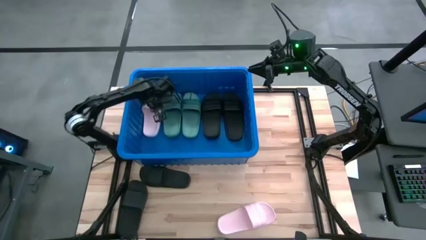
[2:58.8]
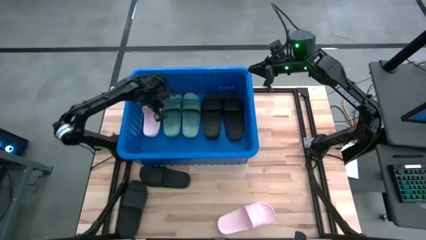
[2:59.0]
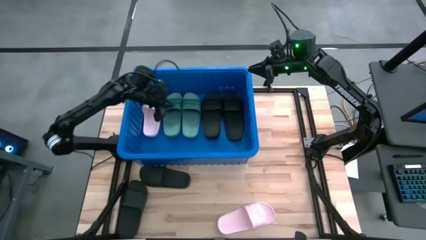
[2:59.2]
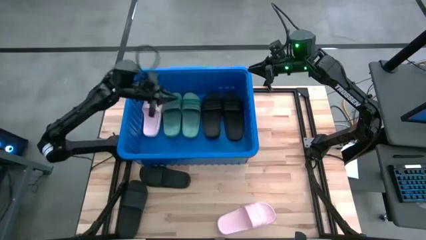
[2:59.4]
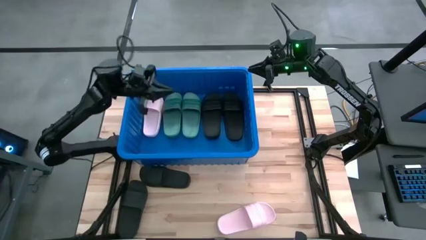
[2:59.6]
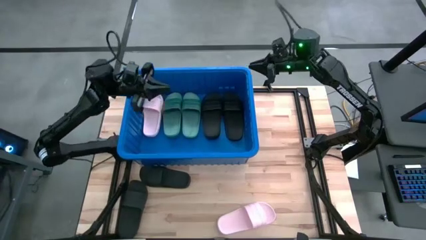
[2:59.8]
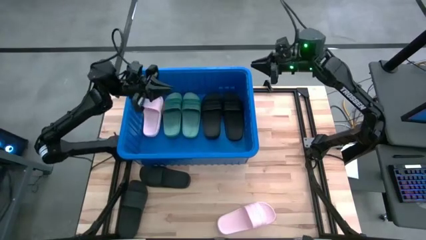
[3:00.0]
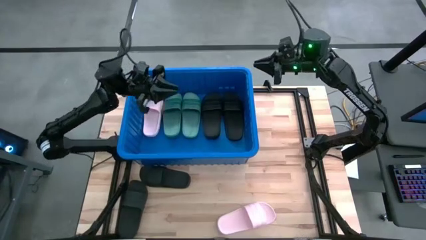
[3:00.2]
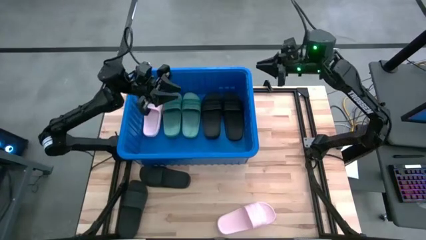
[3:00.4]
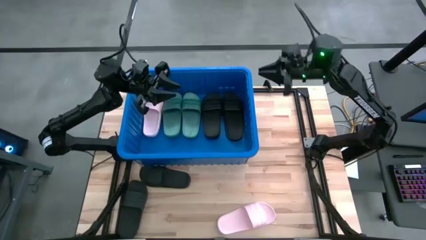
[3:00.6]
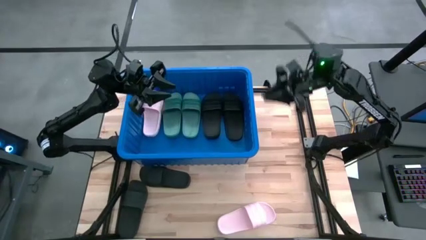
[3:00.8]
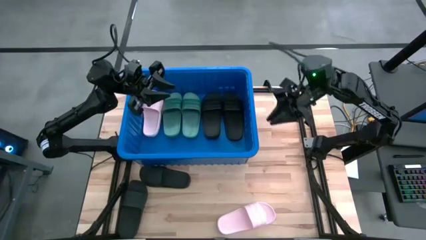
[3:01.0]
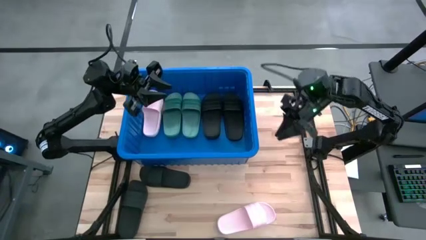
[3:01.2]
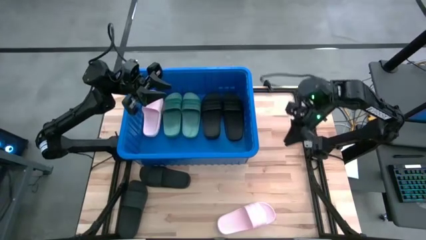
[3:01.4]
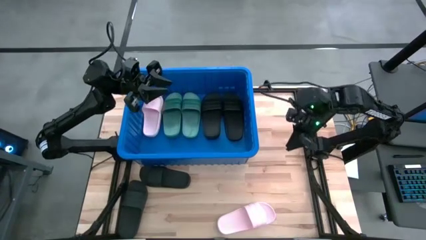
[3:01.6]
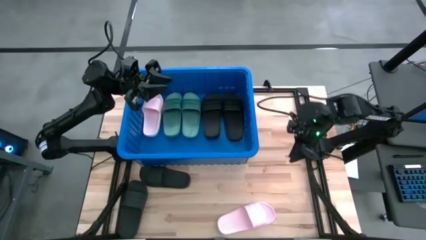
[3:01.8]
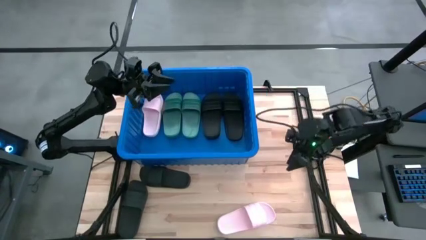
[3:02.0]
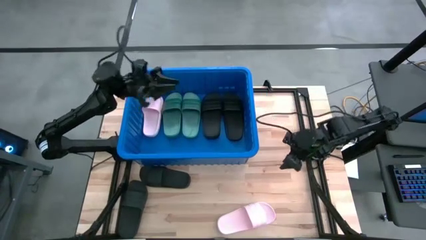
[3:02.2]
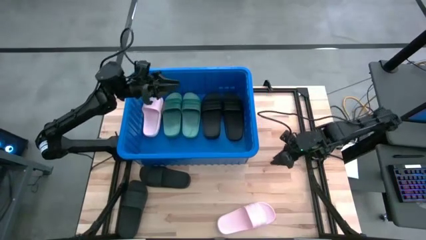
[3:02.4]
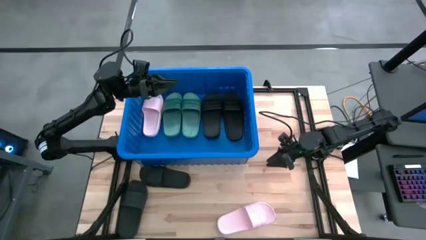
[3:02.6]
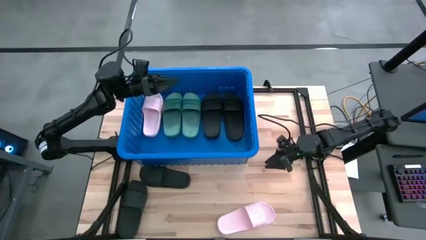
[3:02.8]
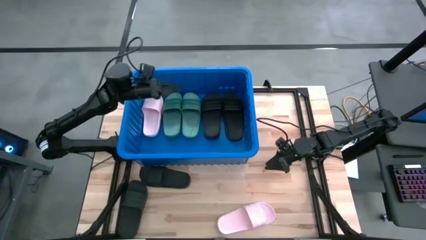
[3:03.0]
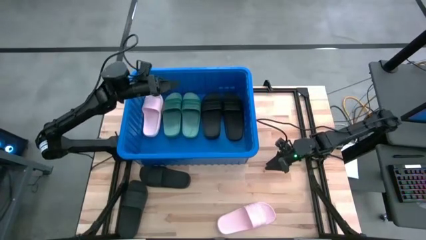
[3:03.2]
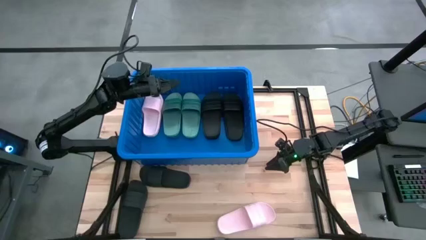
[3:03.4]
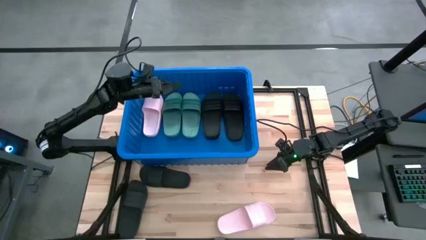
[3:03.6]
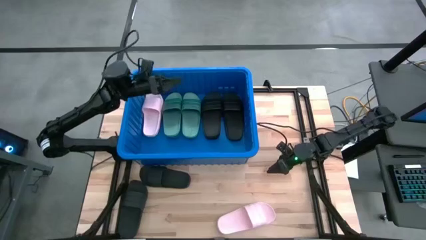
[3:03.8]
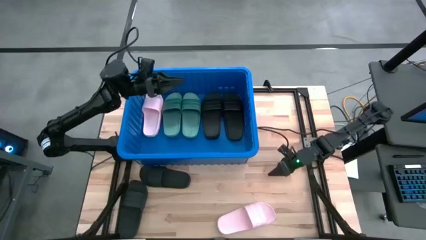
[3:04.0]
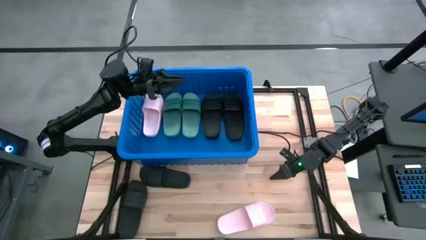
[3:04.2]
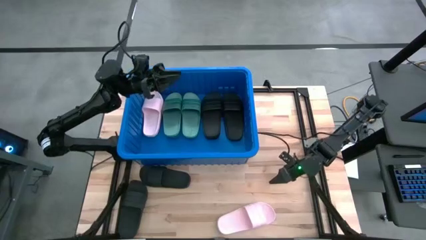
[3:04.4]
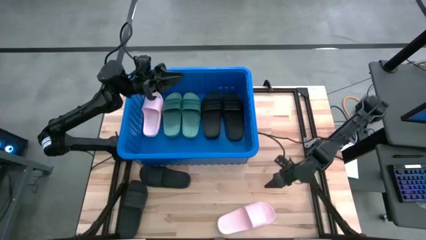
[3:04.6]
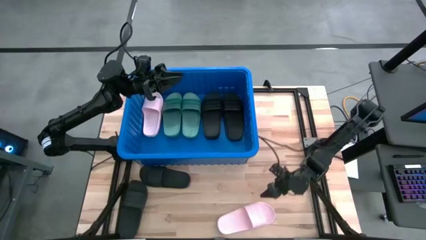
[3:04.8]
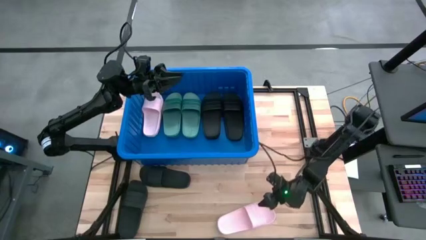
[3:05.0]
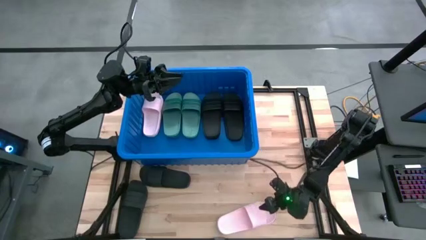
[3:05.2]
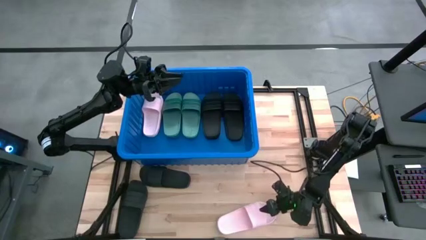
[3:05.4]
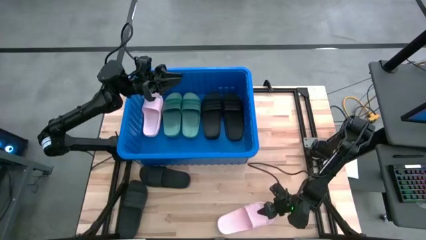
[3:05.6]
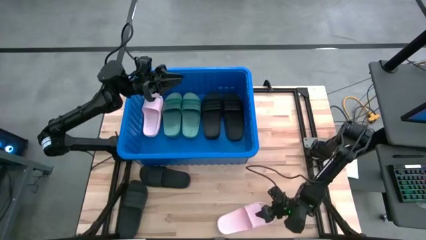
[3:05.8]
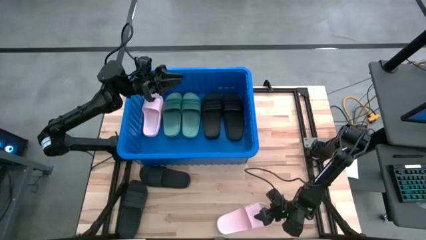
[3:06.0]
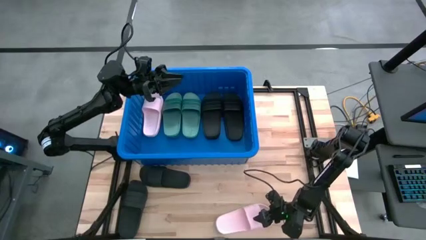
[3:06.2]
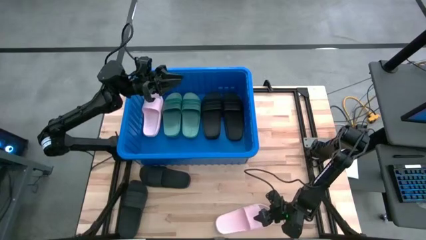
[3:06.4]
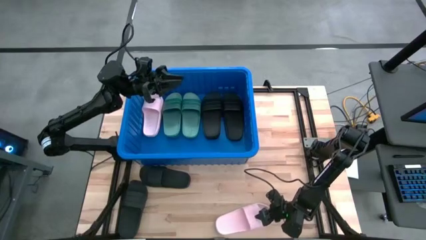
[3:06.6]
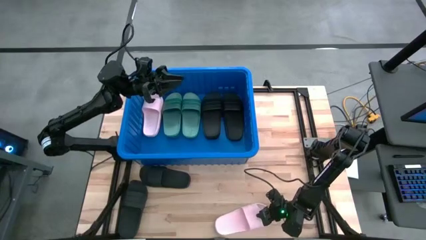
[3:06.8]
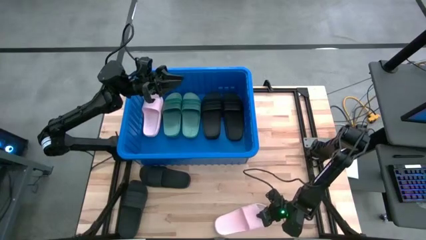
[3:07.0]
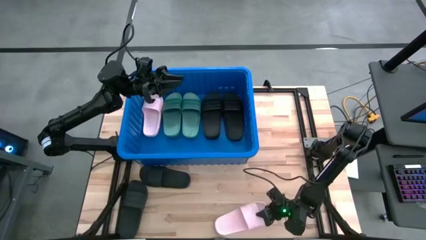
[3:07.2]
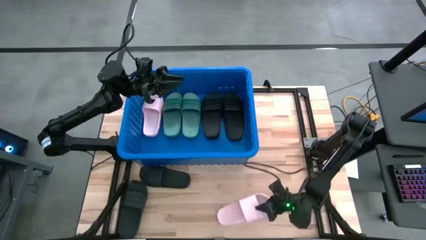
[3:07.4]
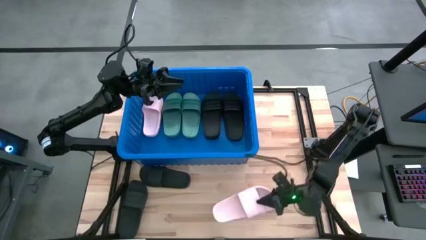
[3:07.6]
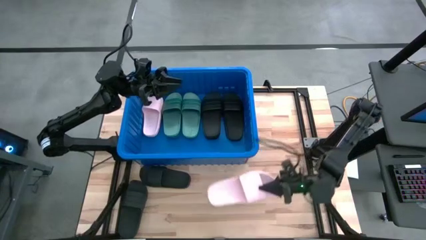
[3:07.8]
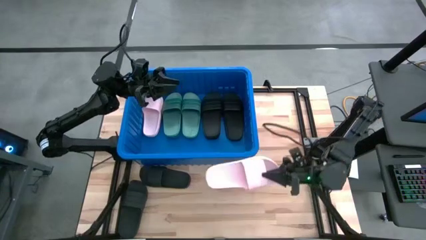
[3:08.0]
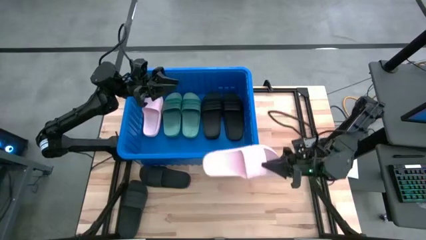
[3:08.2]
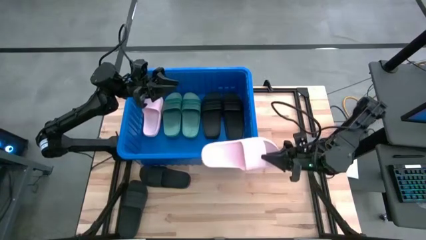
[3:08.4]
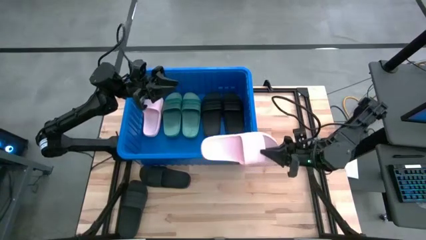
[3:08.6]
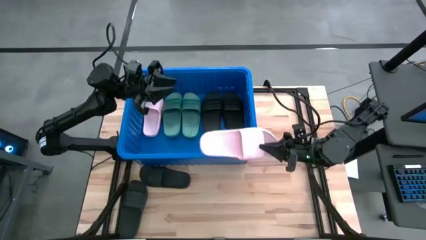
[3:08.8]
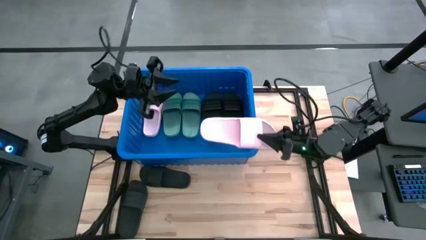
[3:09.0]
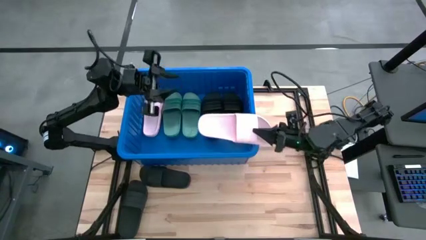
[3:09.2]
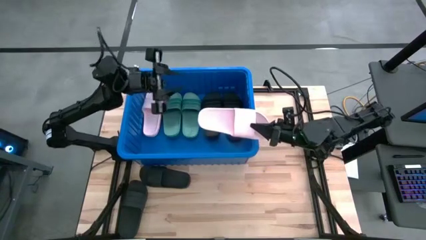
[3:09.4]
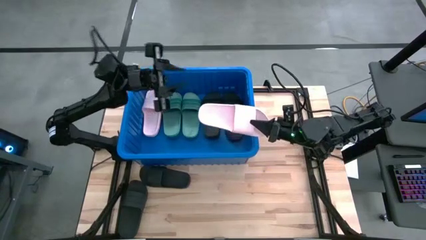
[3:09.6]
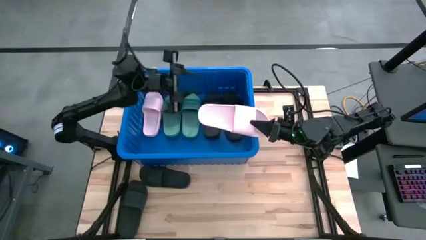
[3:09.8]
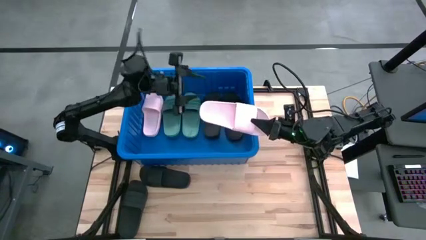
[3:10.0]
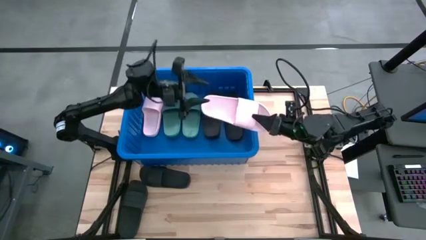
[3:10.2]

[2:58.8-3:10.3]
Task: Pick and place slides into bin
Put the pink slide into the blue bin

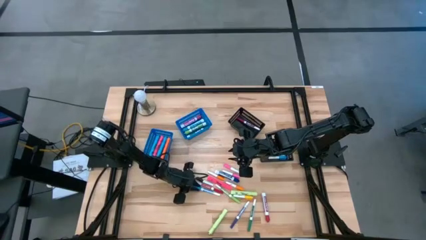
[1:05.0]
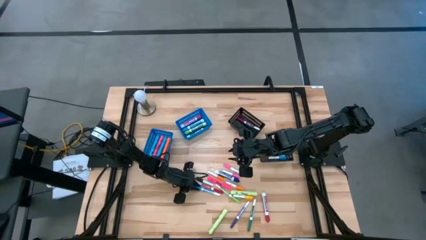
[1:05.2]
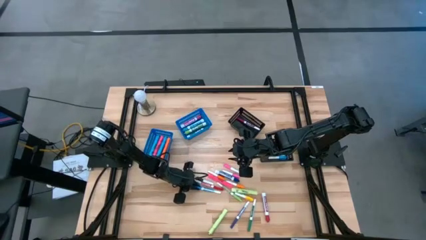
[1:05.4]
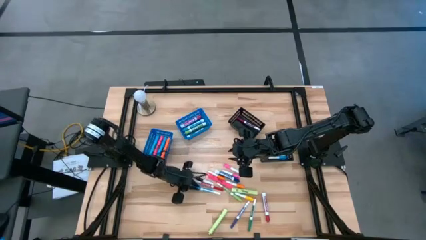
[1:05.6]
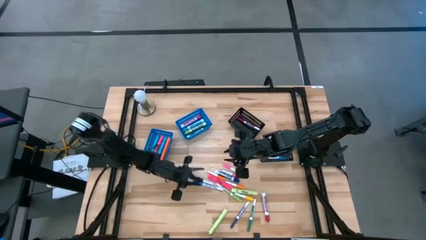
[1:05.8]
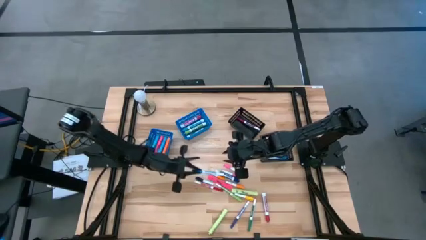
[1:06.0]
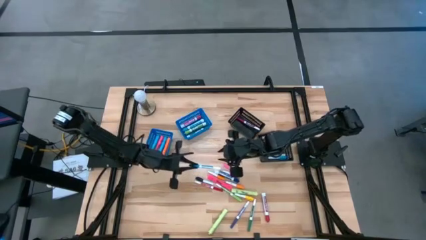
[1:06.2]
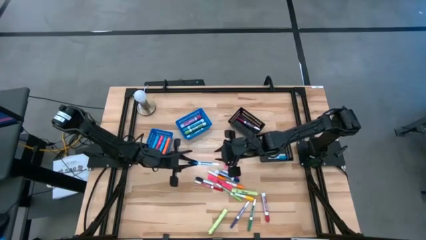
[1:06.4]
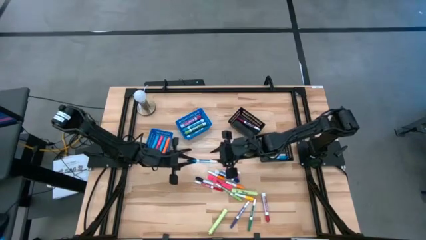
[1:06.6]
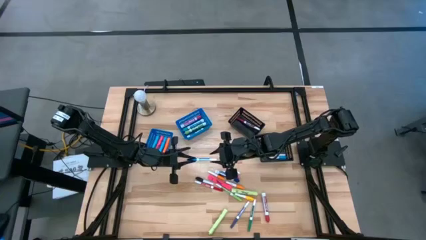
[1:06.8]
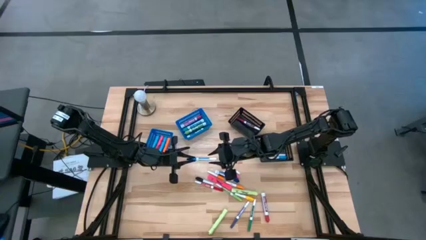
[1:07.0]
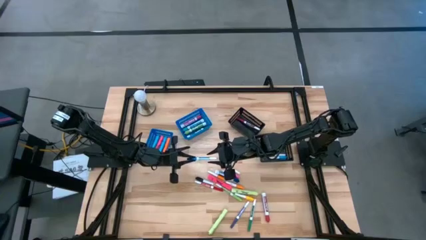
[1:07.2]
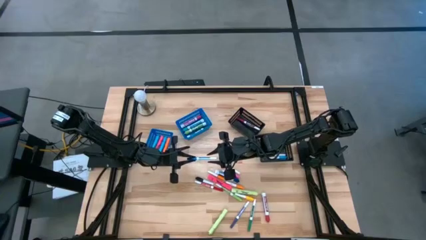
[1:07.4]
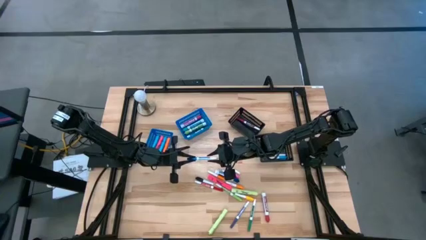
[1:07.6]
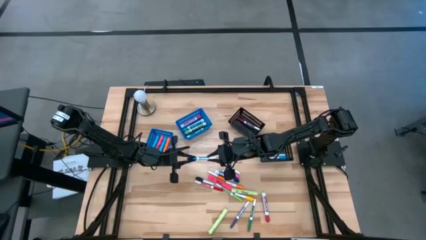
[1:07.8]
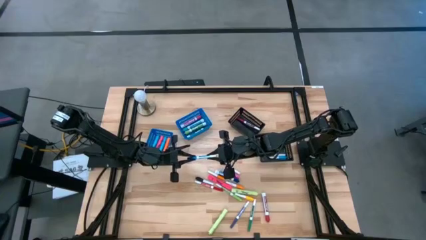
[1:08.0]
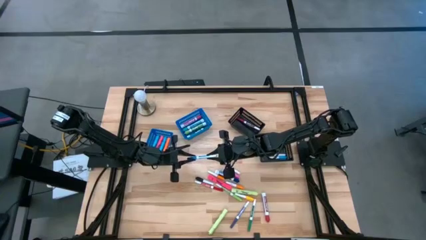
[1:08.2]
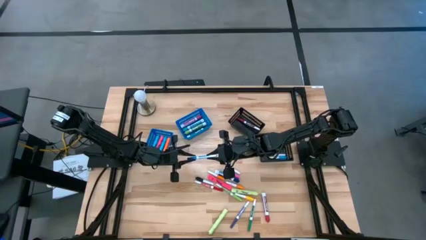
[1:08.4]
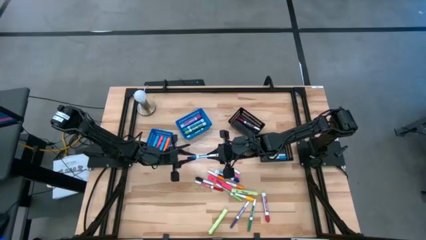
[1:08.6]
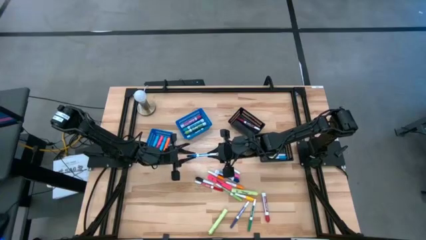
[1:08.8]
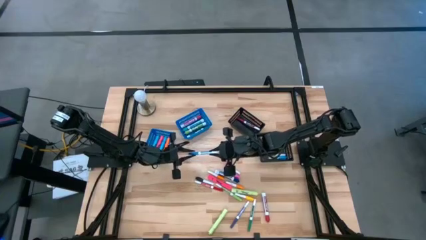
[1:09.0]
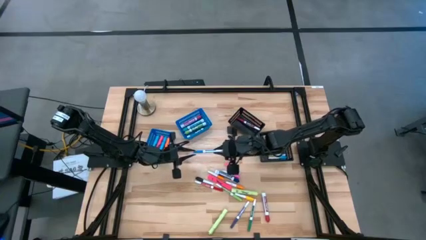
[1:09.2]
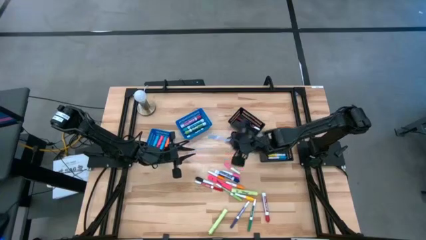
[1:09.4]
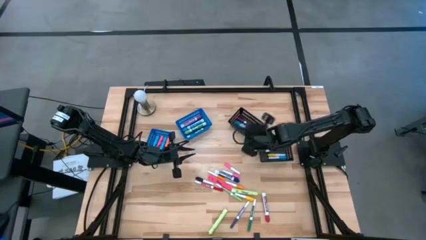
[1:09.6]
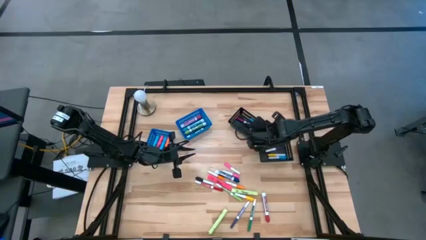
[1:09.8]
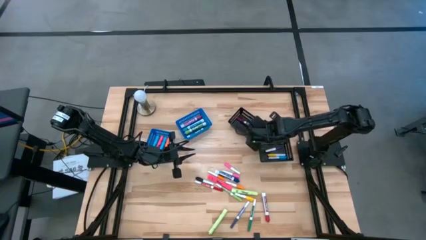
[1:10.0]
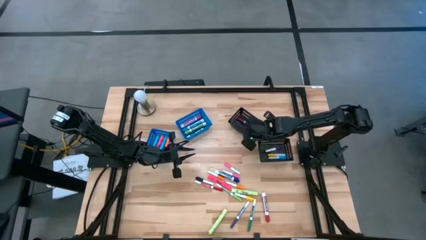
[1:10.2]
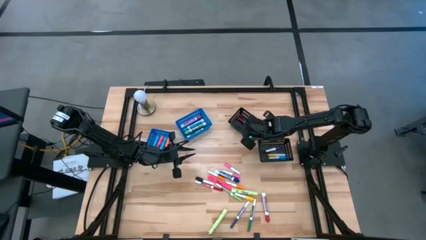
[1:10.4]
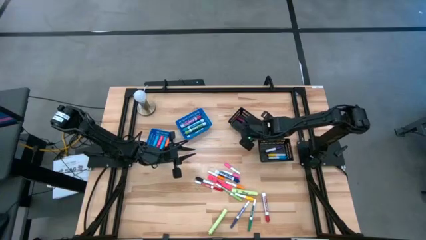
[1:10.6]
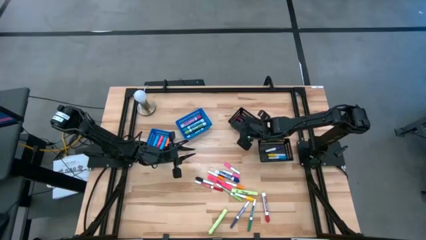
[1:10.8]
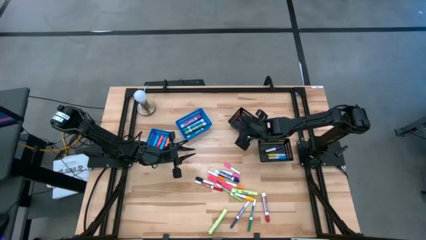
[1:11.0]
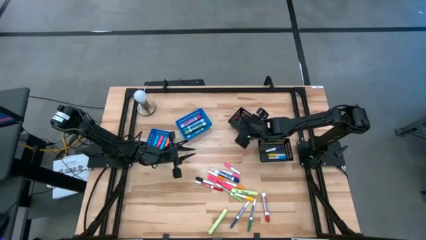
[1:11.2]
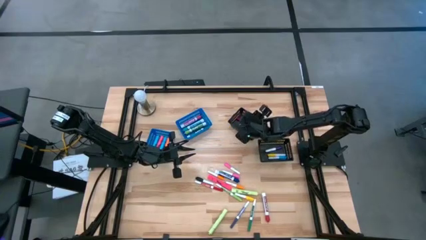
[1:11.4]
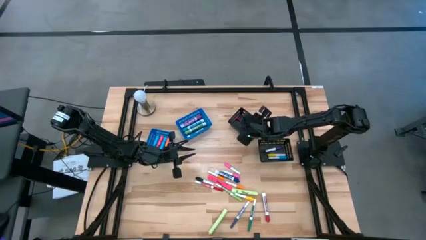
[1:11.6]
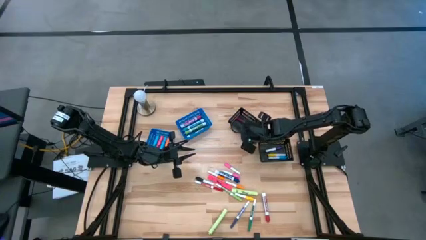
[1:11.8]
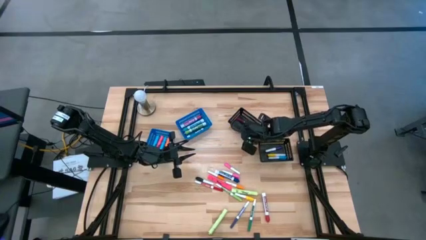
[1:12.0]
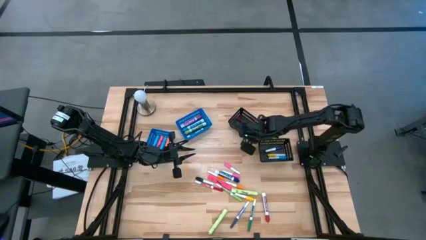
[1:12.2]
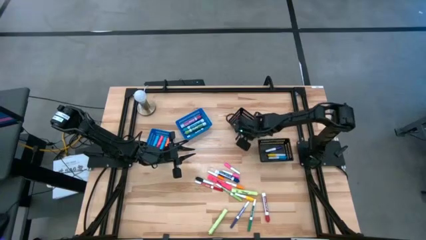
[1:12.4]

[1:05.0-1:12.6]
Task: Pick & Place Markers
Put the light blue marker pen into the top black bin
